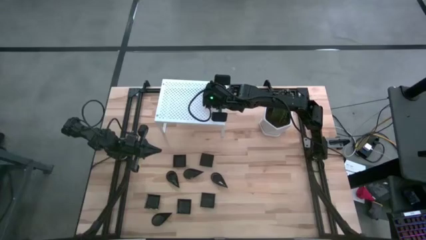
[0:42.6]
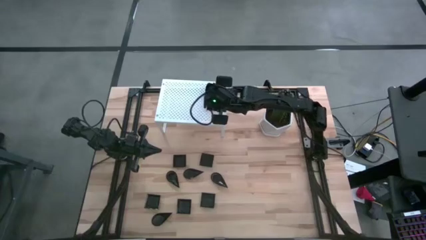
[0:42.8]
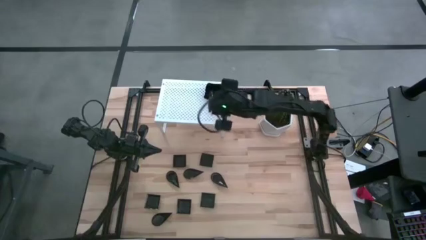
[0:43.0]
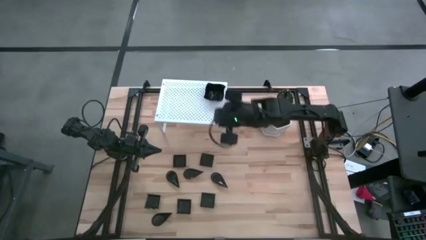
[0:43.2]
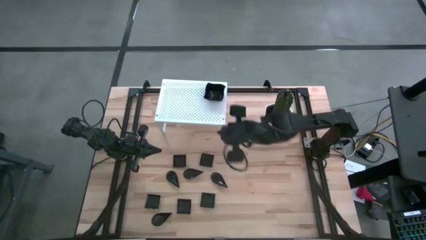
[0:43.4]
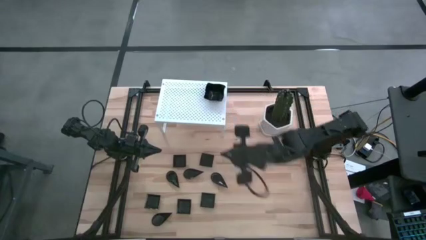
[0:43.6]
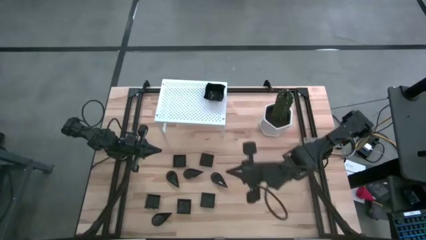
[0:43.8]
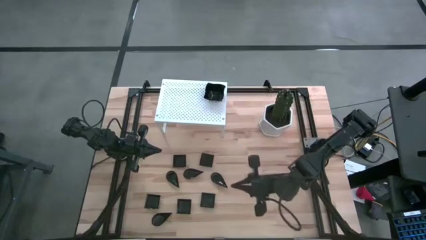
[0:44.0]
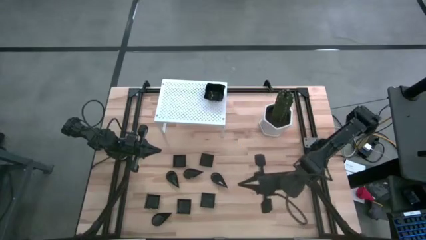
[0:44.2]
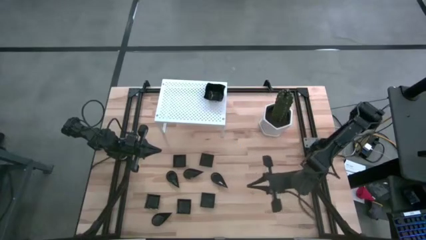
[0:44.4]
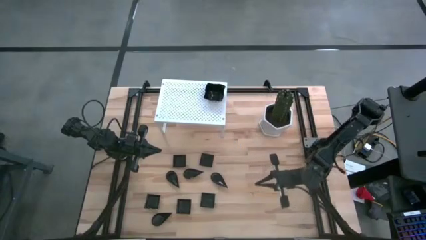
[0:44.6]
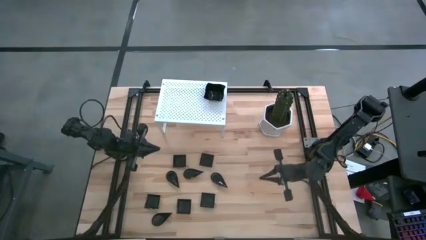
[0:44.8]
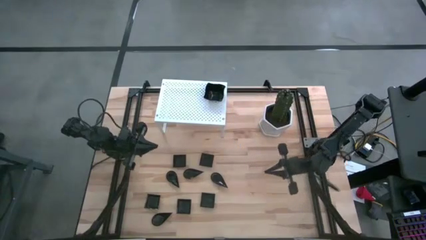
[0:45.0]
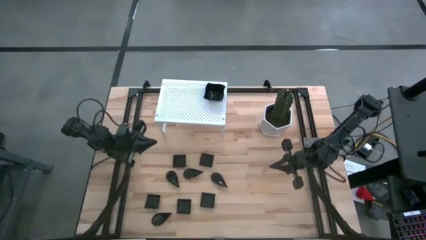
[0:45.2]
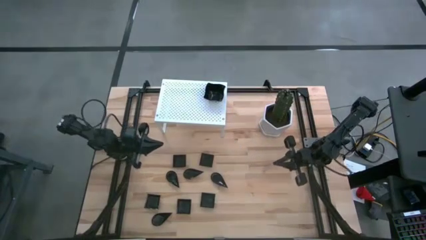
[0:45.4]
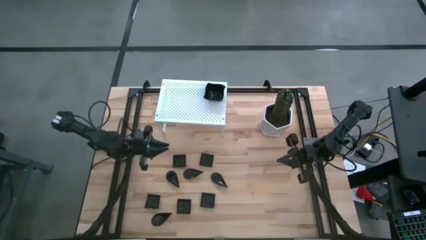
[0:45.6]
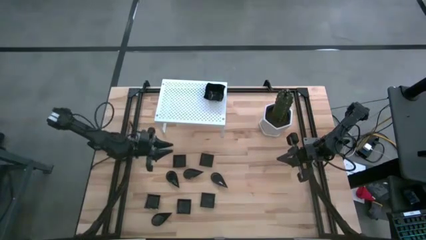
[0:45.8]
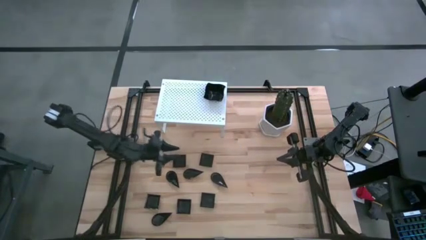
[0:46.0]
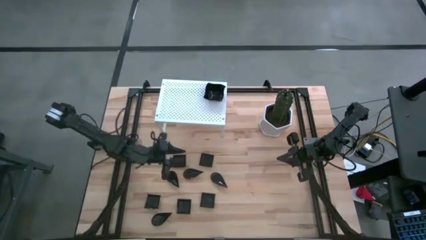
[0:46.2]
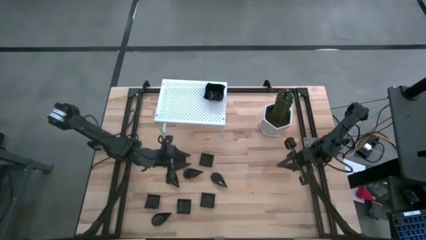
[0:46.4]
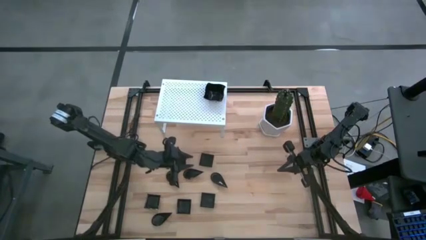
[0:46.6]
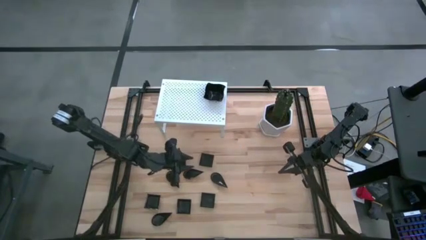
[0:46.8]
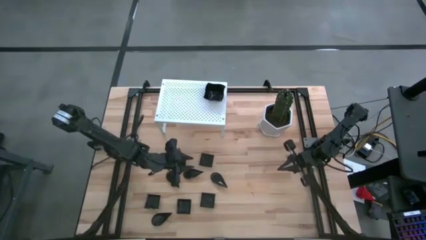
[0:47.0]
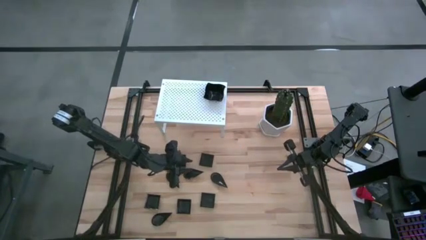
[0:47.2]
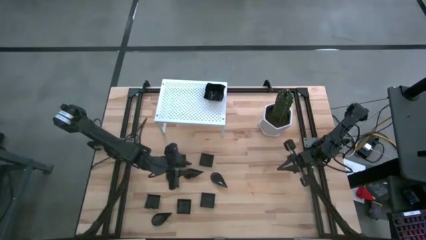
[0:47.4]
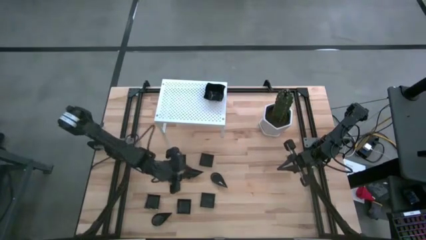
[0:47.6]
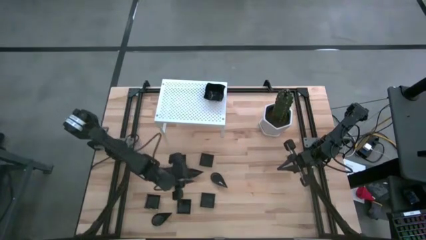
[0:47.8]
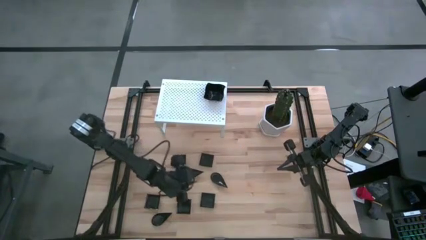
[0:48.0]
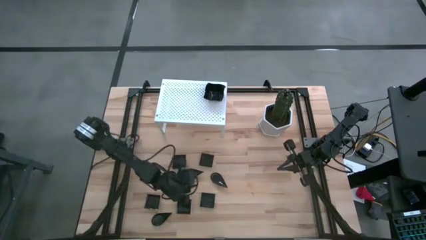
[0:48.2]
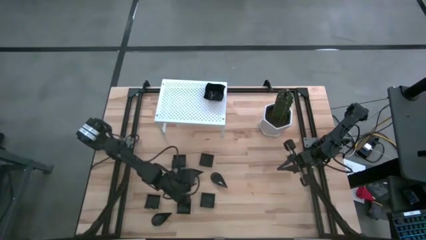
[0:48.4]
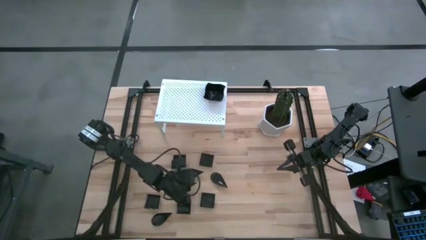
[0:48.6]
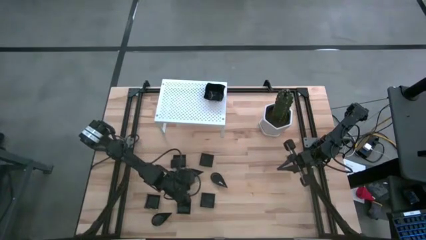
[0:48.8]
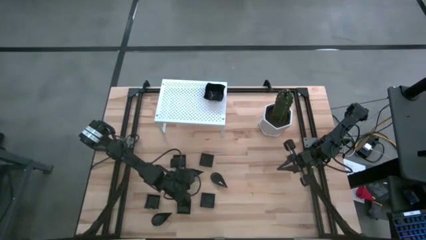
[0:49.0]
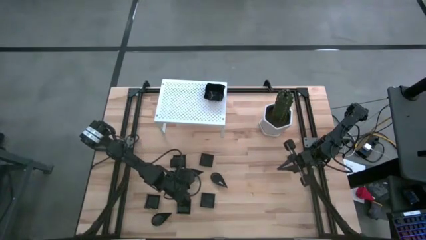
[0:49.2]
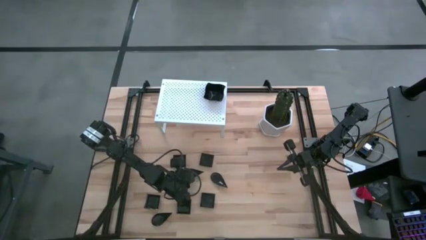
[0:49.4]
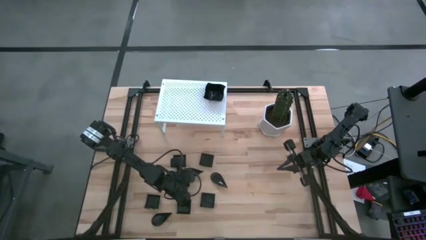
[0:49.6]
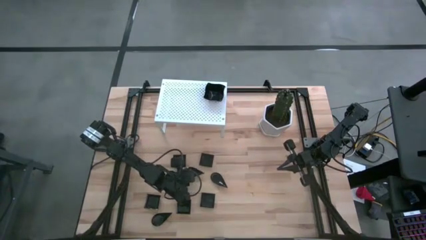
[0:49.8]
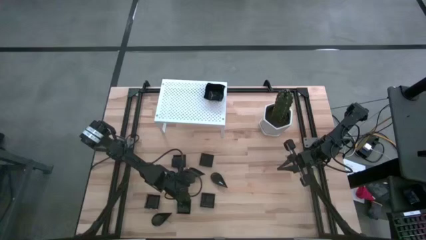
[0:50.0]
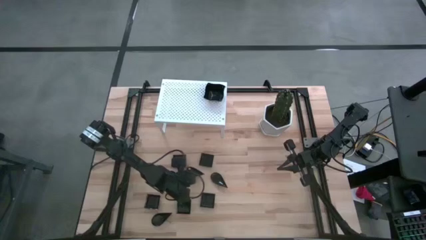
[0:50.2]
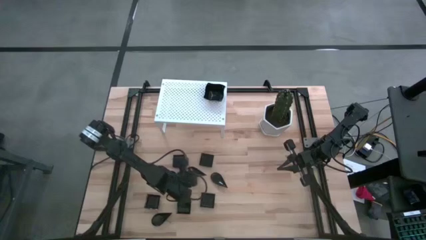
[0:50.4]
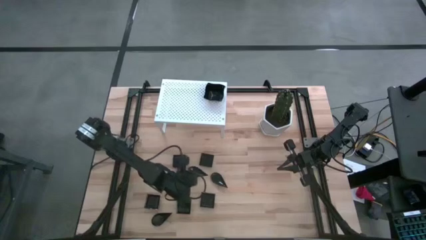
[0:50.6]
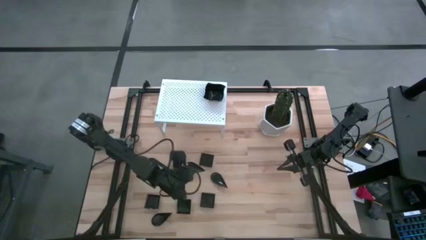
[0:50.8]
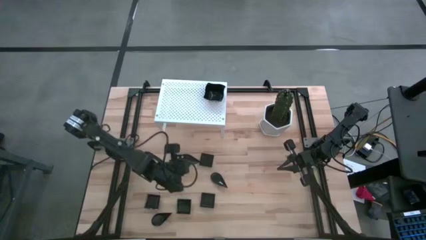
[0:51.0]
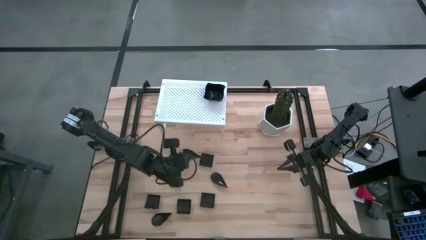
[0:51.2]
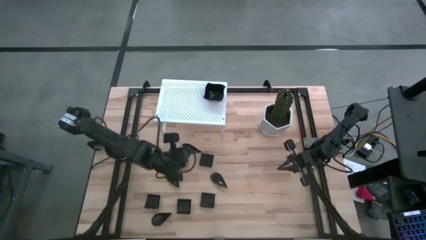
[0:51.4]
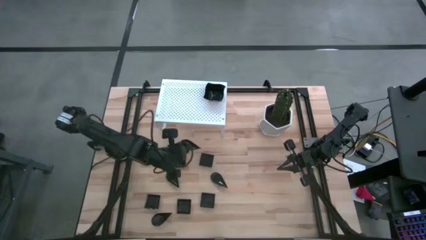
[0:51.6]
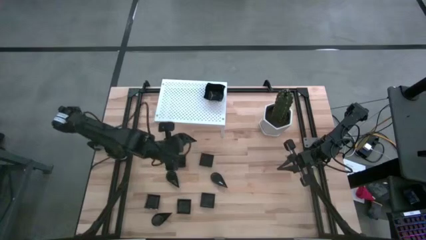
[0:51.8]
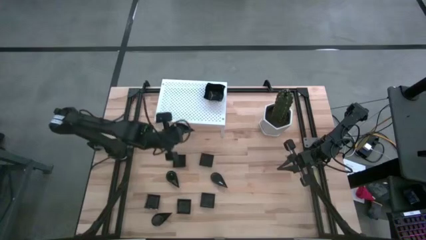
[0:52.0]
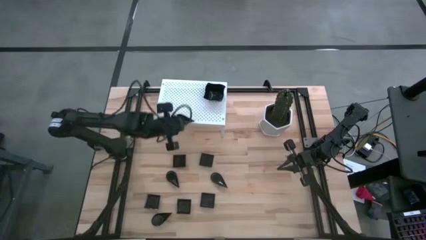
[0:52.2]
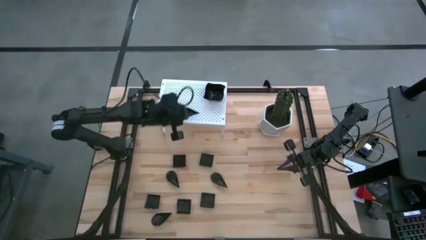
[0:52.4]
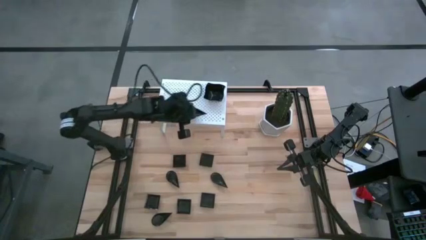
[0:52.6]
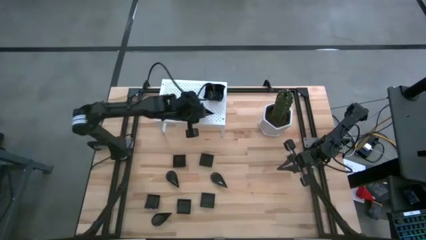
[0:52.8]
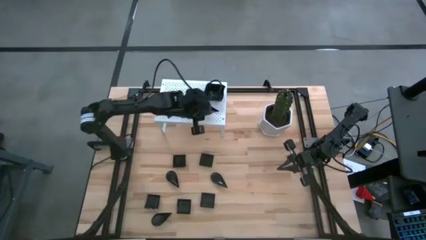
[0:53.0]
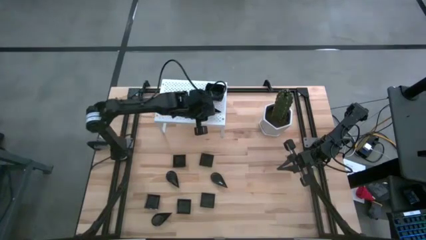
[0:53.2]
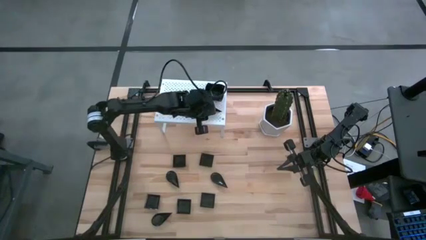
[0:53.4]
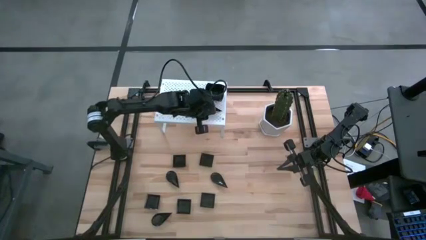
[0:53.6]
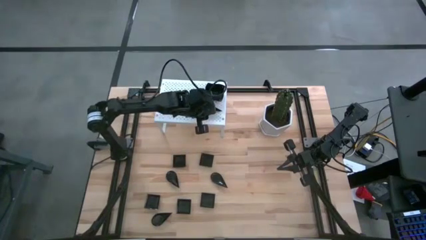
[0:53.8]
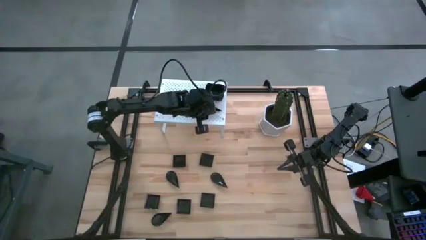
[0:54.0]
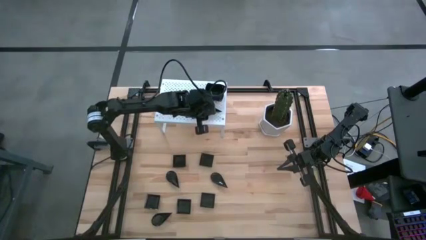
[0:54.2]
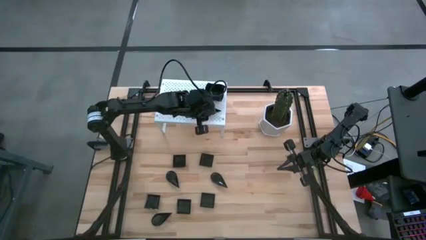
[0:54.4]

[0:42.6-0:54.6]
Task: Pick & Place Mini shaped plates
Put the drop-shaped plate on the shelf

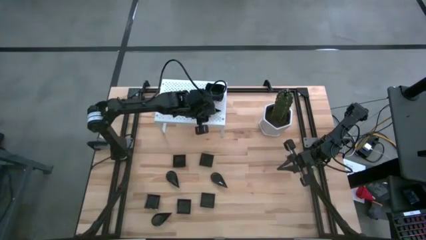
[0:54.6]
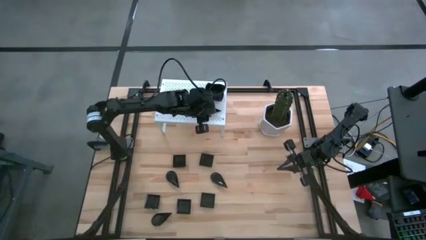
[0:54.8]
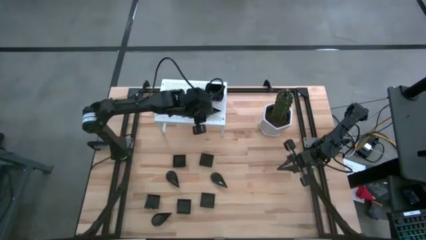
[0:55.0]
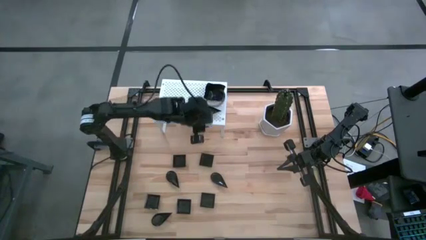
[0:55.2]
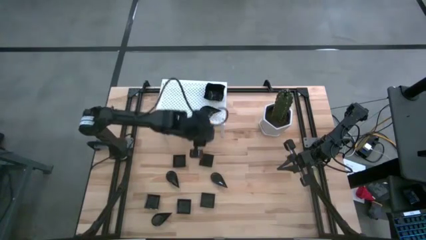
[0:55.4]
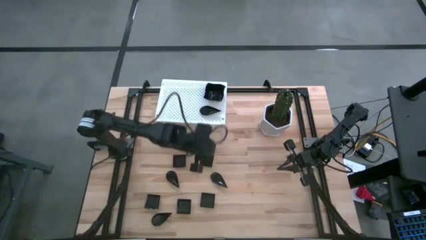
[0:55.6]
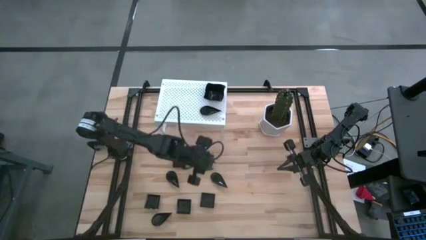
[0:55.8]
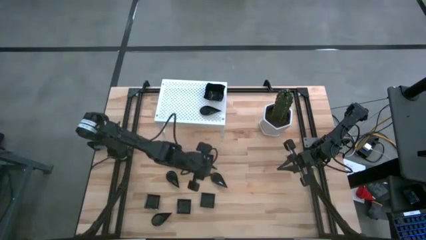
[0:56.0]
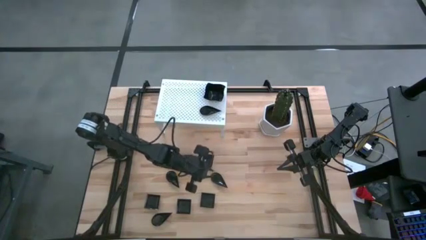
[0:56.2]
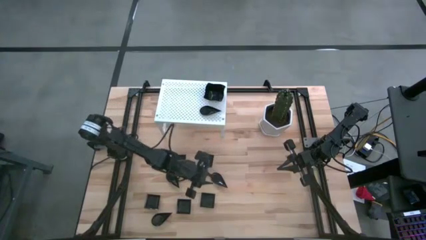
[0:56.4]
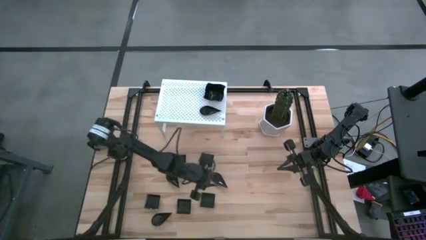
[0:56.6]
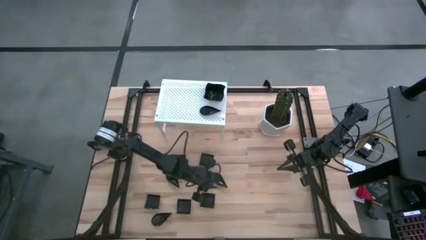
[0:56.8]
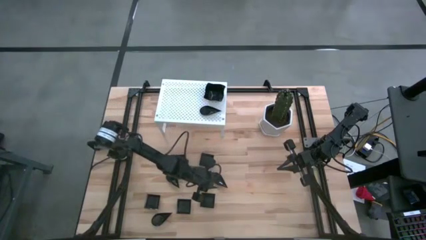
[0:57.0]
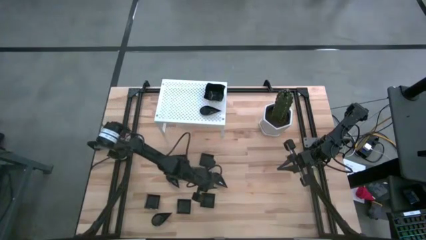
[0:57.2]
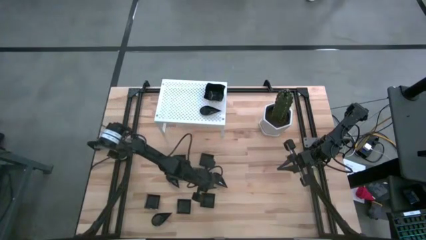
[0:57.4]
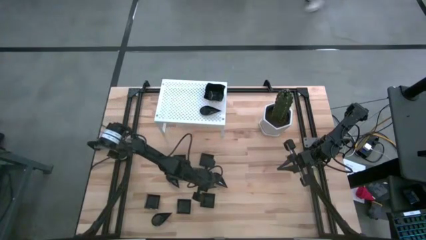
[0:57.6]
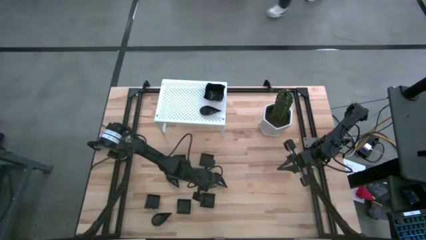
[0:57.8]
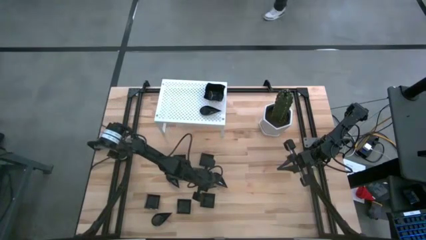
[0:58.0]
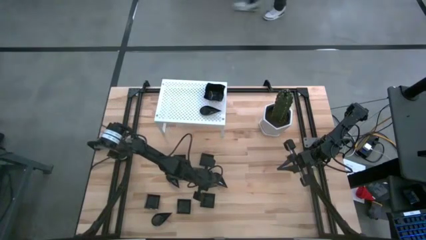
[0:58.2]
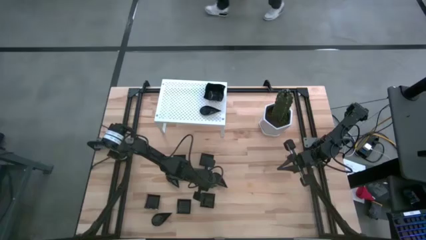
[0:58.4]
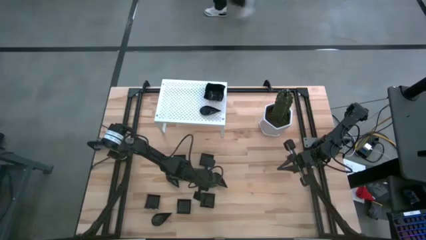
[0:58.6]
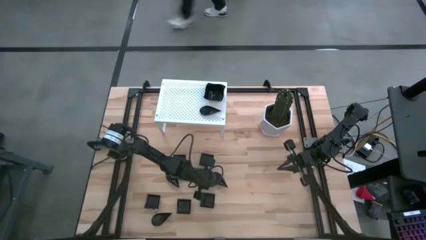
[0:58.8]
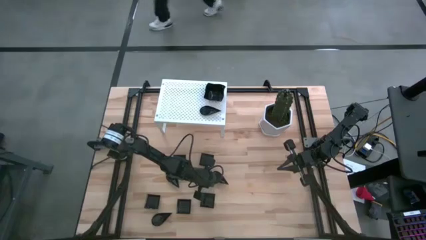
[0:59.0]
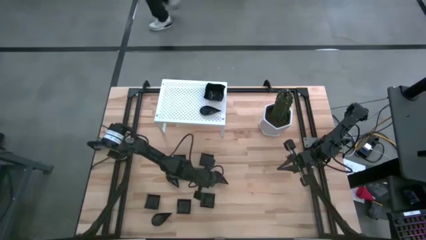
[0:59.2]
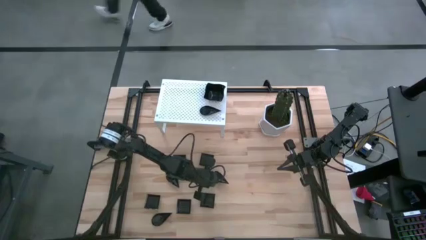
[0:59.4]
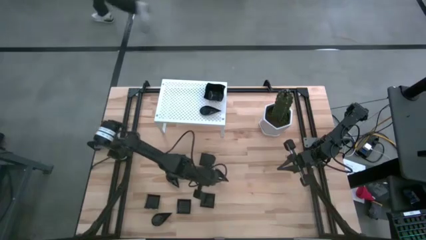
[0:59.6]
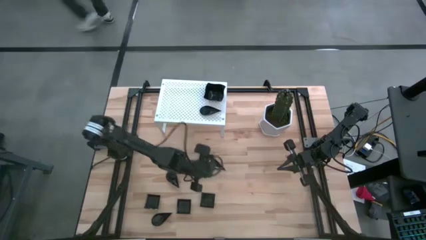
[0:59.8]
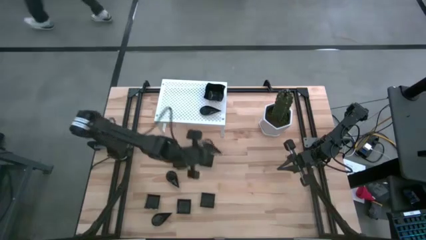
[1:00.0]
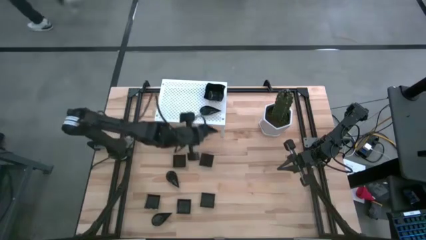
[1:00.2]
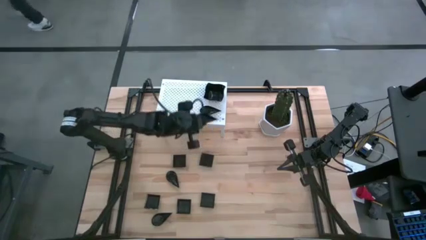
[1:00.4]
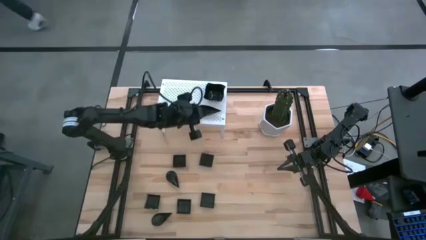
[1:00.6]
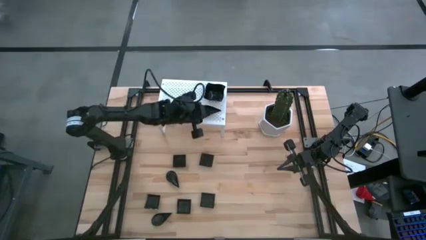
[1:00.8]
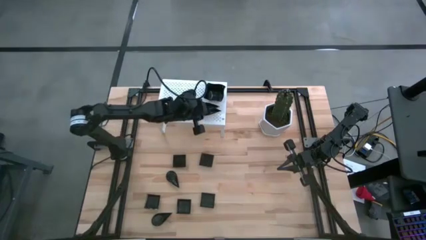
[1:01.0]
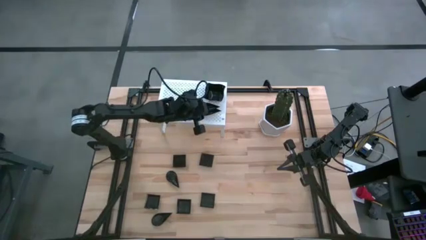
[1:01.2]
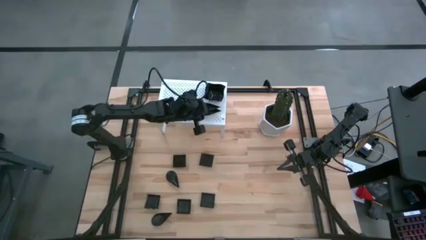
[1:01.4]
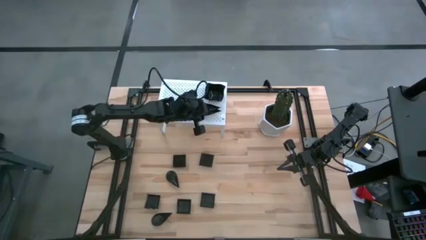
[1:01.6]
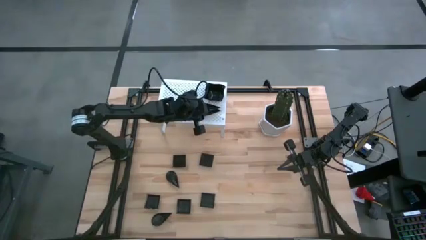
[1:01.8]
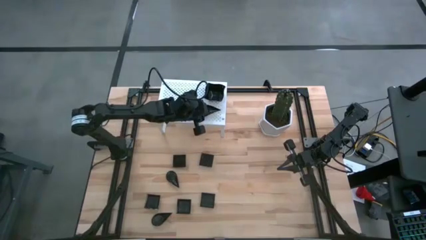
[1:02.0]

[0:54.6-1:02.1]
Stack the drop-shaped plate on top of the other drop-shaped plate on the shelf
